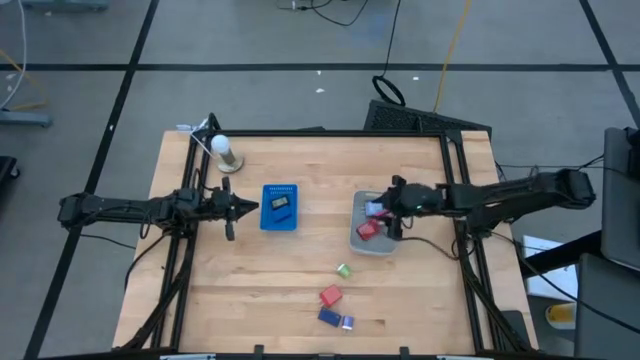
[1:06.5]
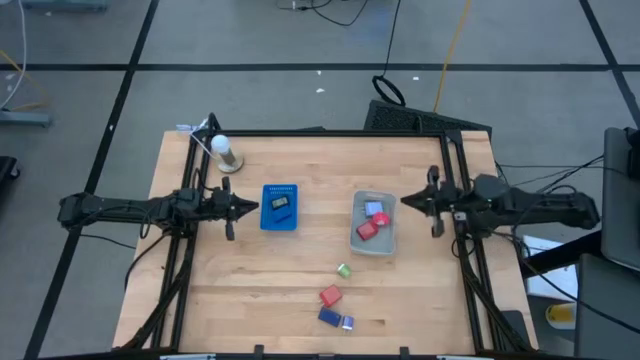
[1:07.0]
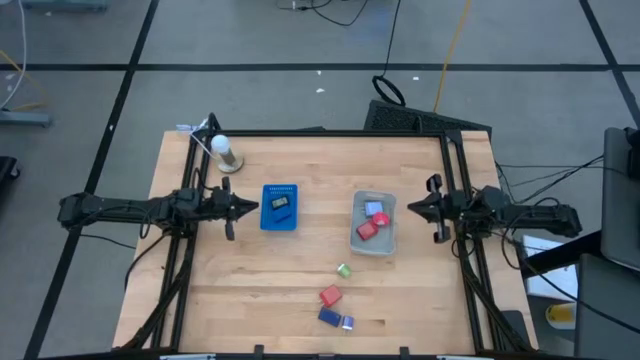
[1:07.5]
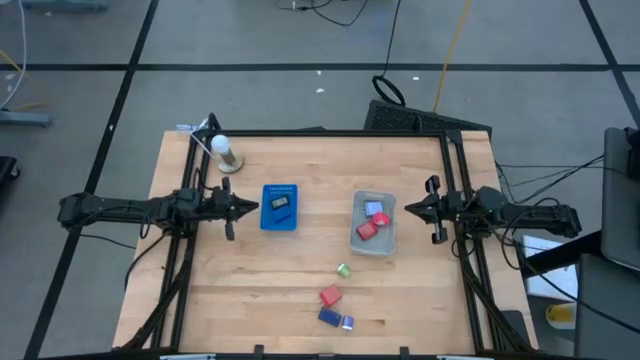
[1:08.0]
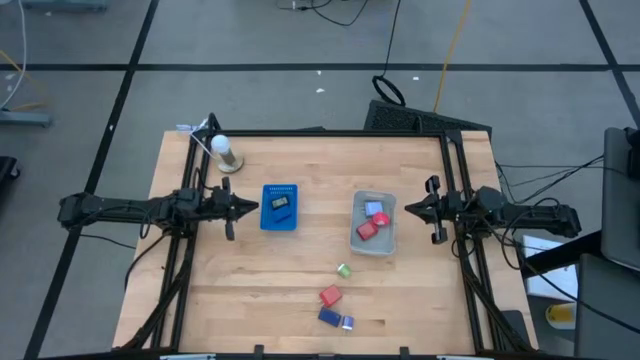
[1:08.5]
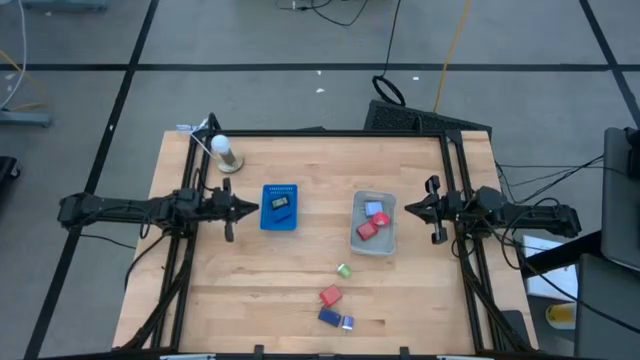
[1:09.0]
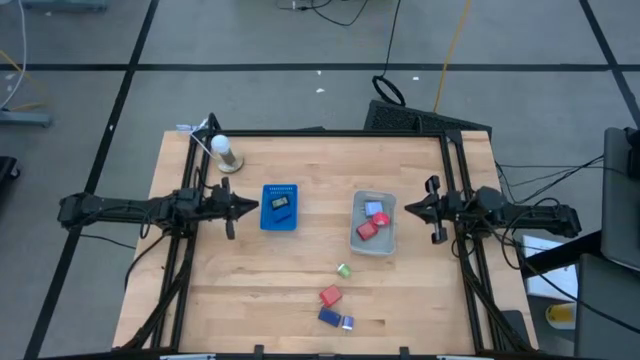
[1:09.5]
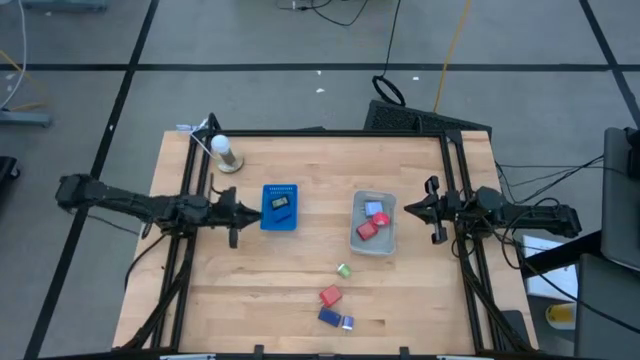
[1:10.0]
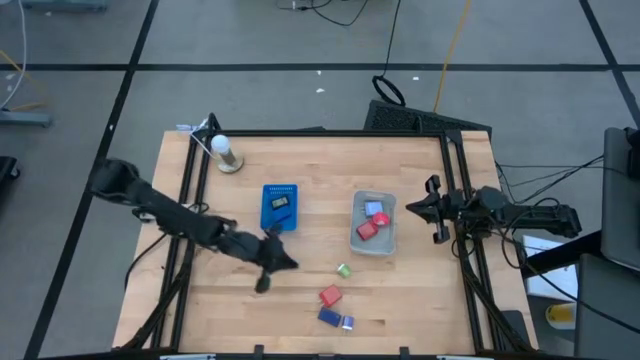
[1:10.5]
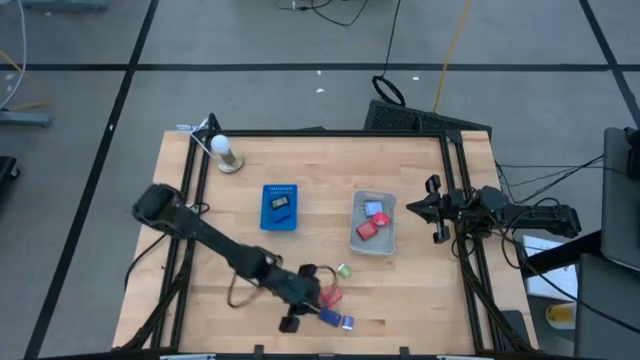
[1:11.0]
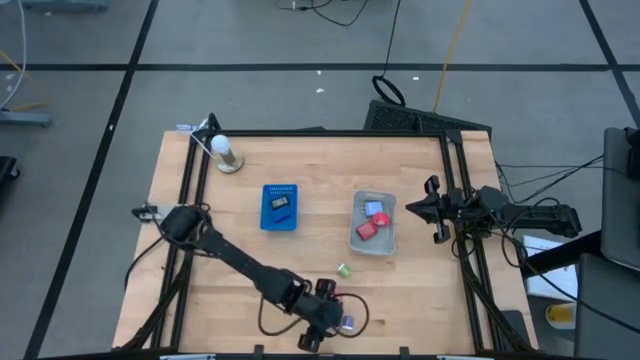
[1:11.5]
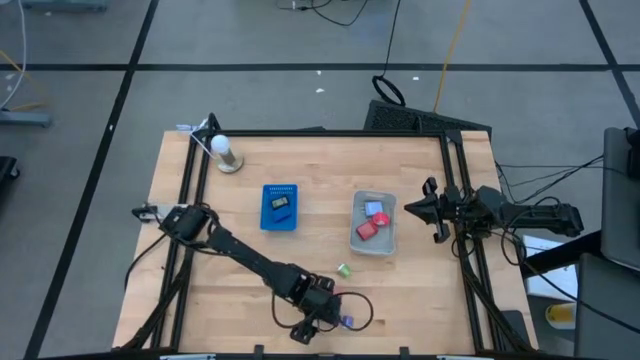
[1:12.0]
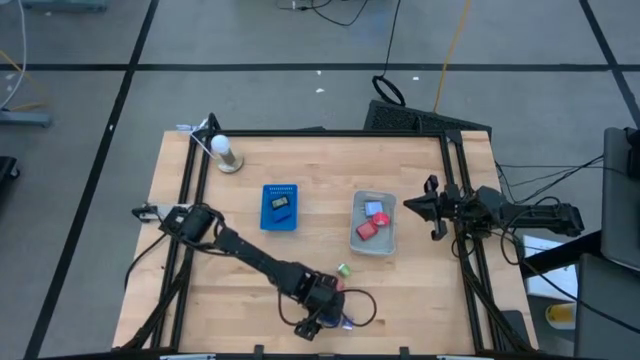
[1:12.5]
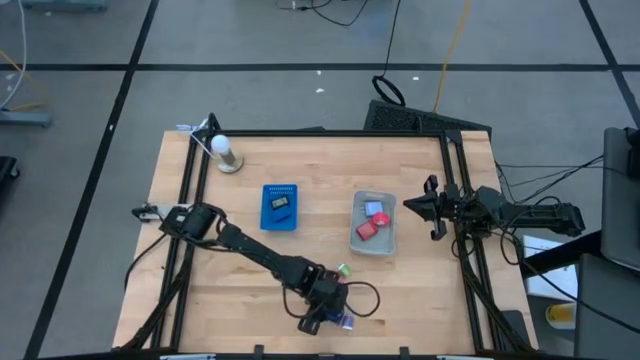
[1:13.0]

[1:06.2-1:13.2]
Task: Pick & Place Office items
Put the blue digital clock into the blue bin

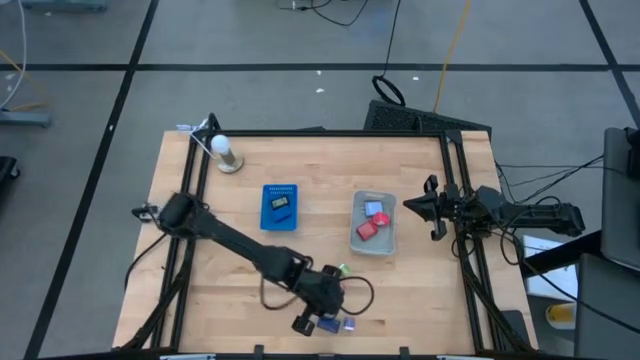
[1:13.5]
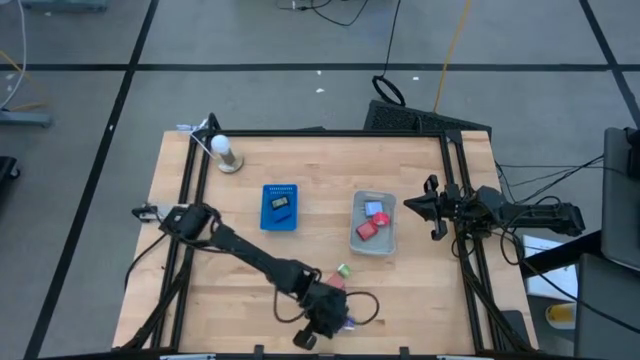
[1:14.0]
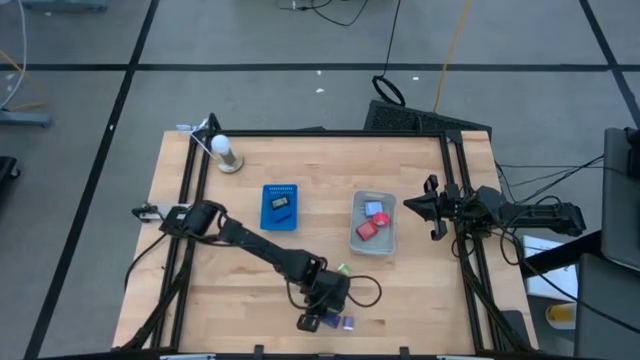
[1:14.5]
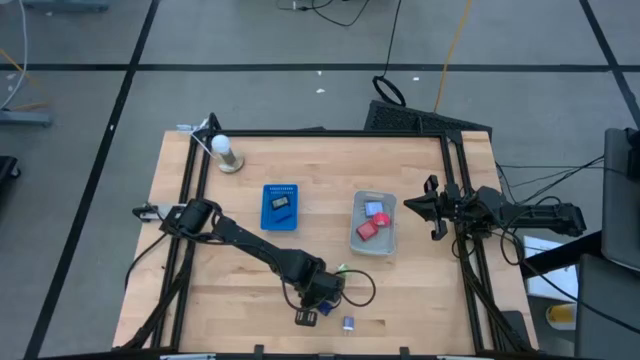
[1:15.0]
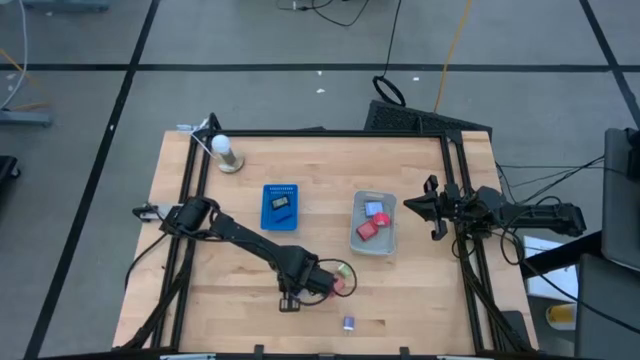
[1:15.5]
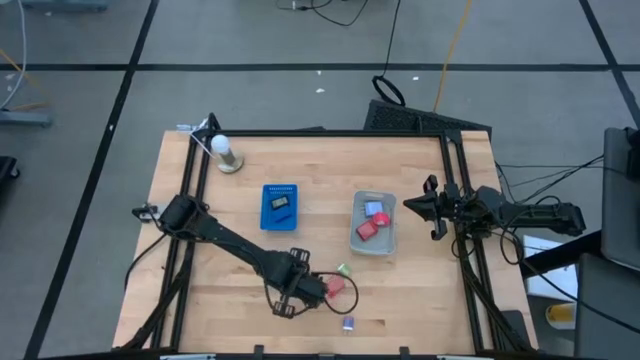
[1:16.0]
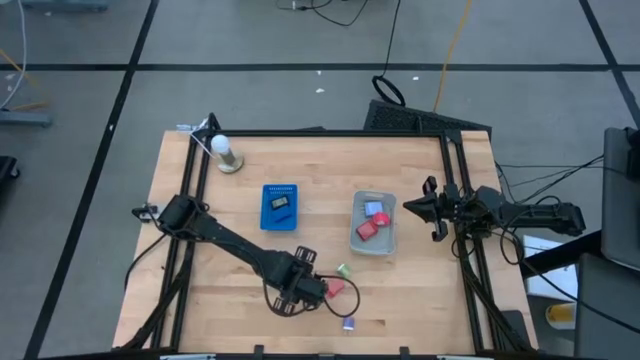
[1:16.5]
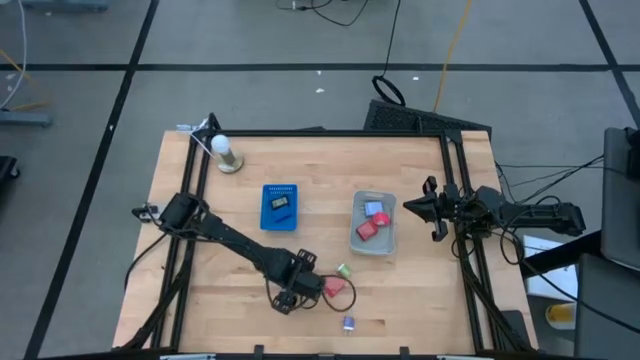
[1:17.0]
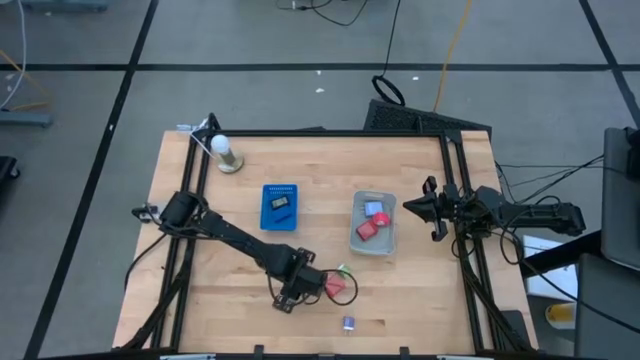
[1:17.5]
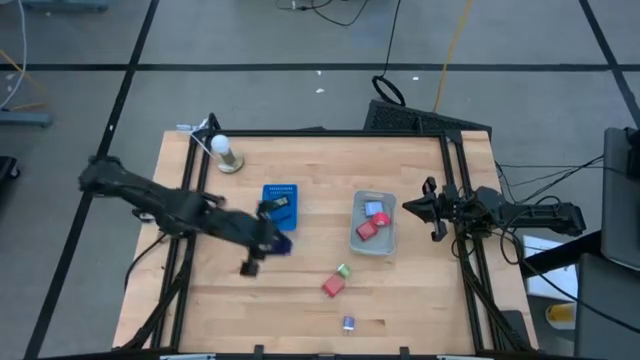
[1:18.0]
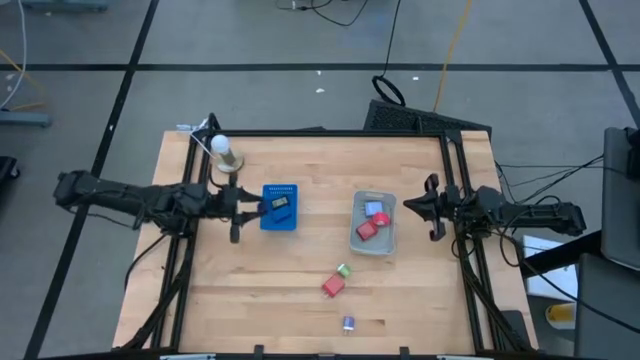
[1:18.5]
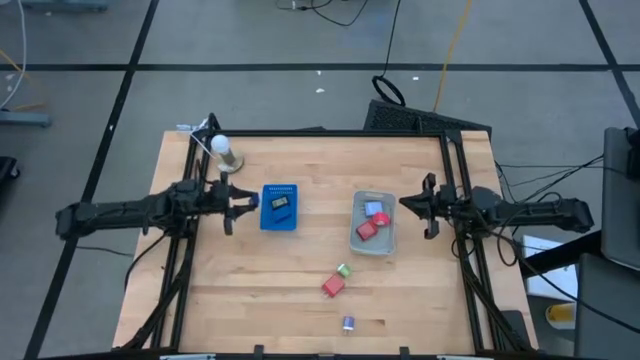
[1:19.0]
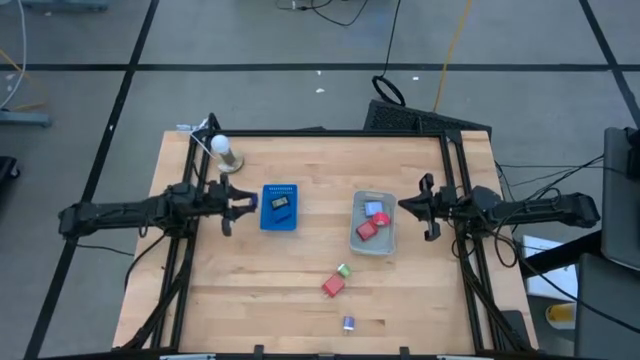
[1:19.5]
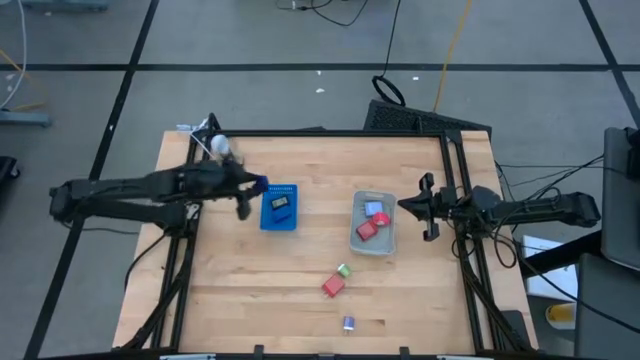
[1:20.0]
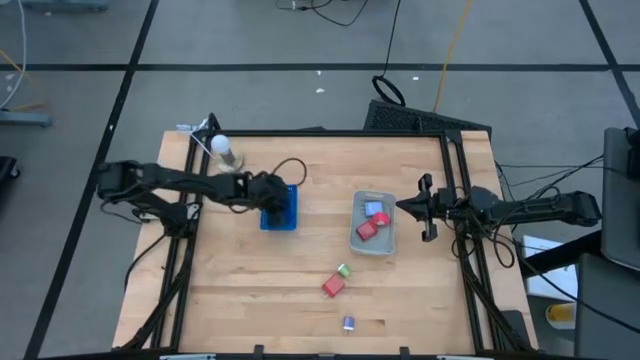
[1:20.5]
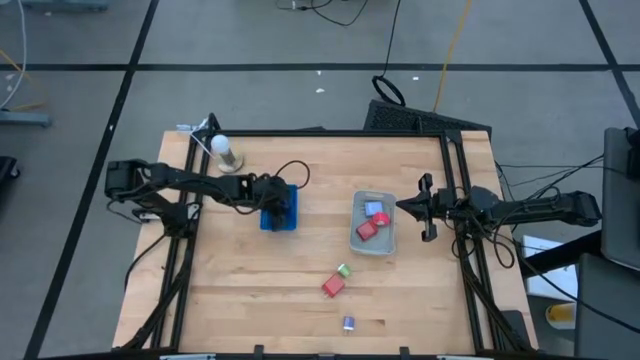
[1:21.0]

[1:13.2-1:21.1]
Put the blue digital clock into the blue bin

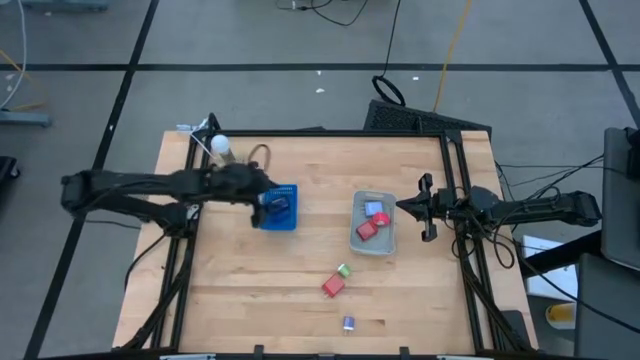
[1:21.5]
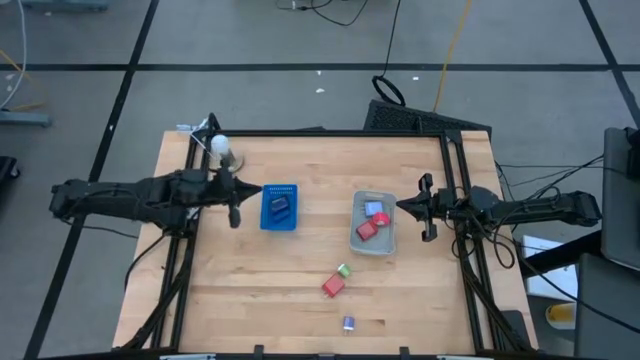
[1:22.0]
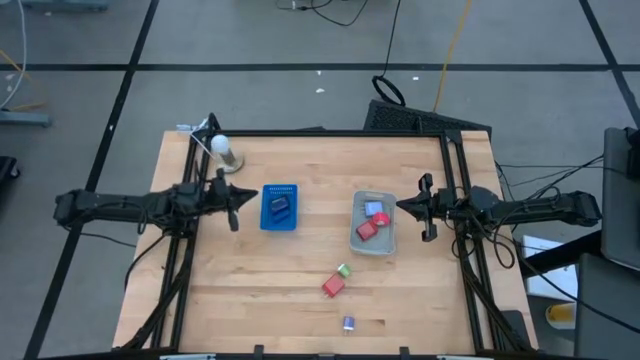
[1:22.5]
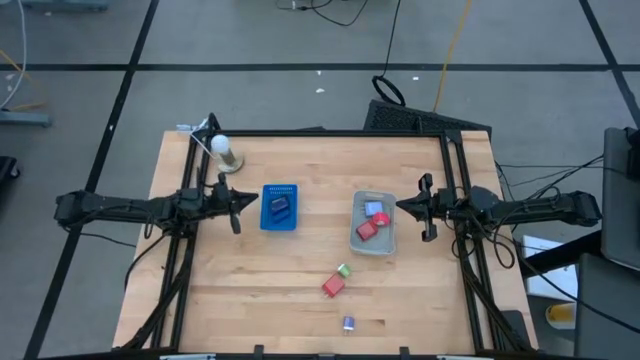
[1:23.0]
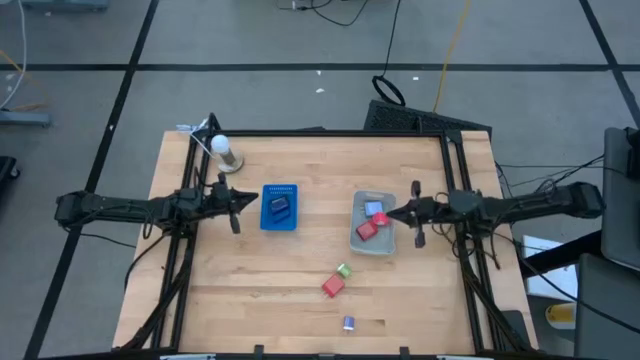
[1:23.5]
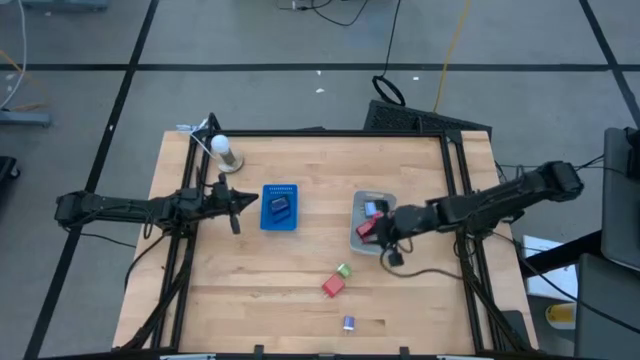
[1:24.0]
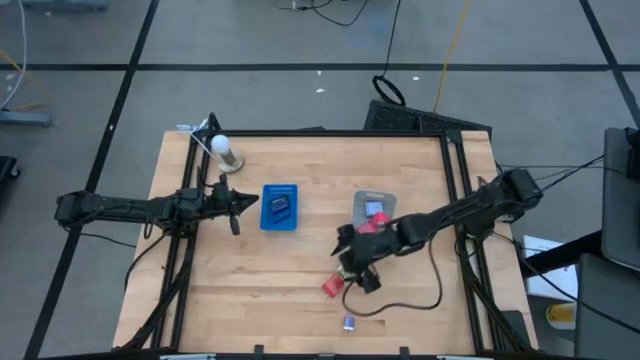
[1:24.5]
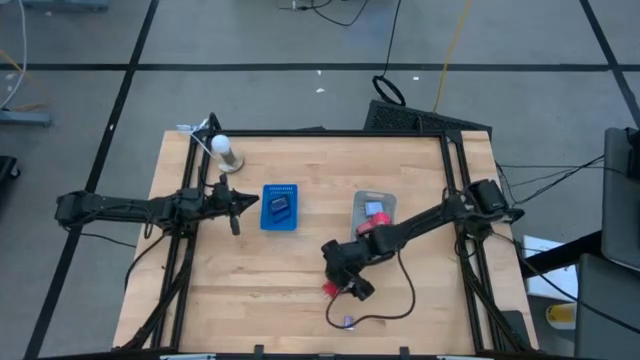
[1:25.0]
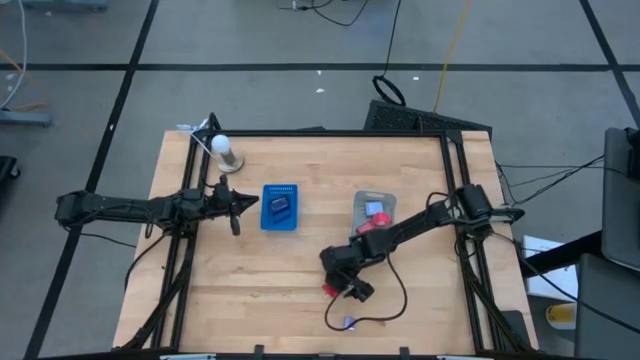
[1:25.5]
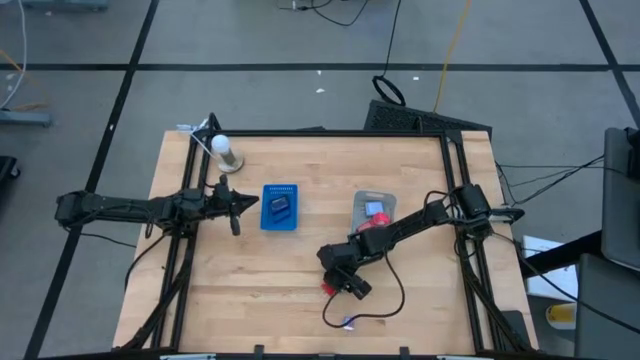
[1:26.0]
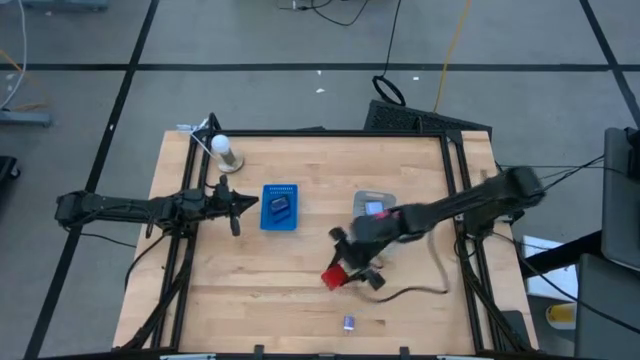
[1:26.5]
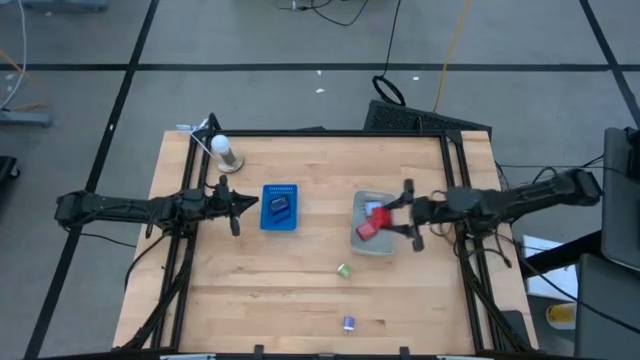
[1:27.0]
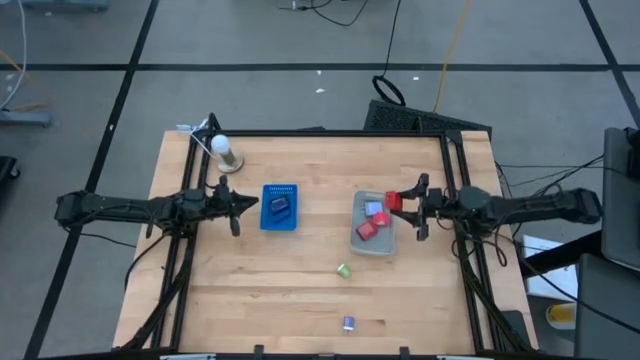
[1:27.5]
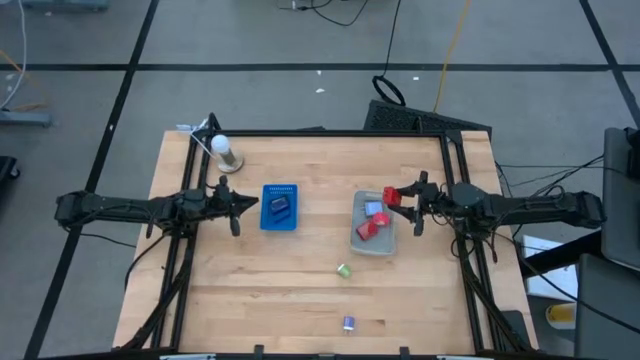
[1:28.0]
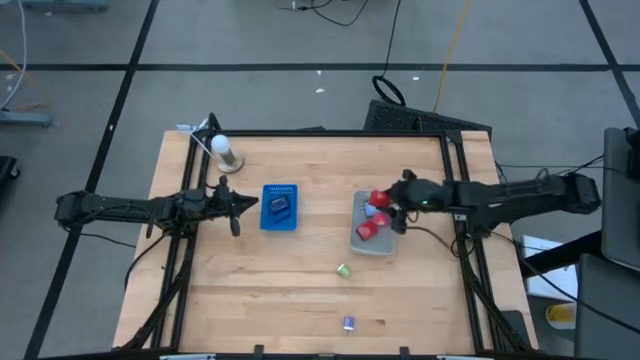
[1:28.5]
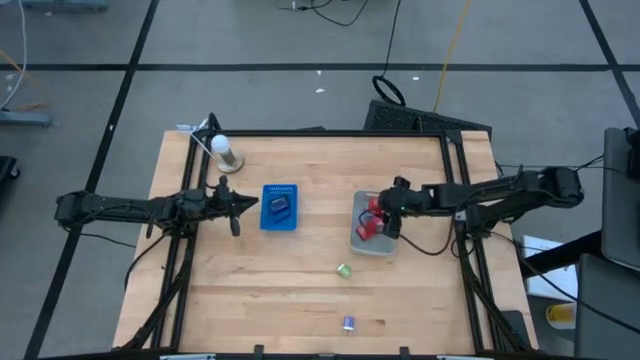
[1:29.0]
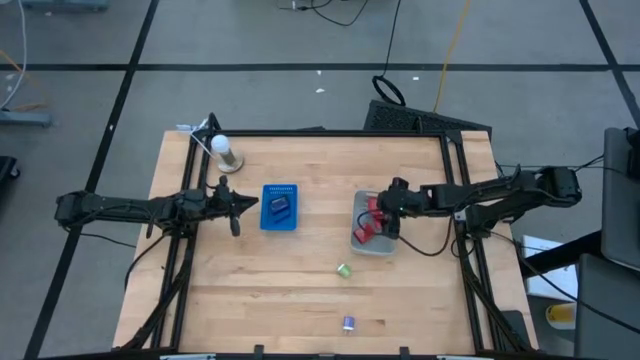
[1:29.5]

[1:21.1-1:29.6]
Put the red charger adapter into the gray bin
